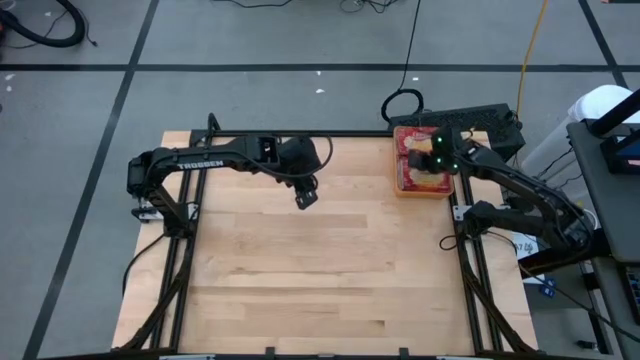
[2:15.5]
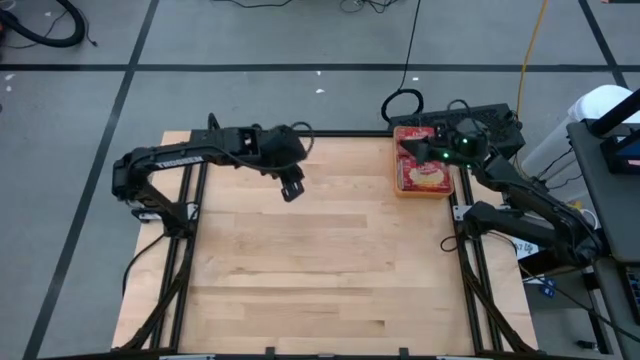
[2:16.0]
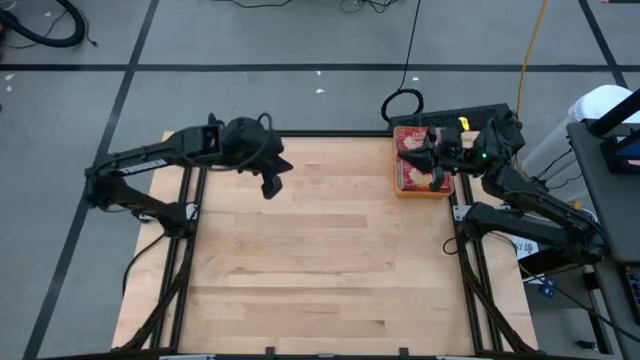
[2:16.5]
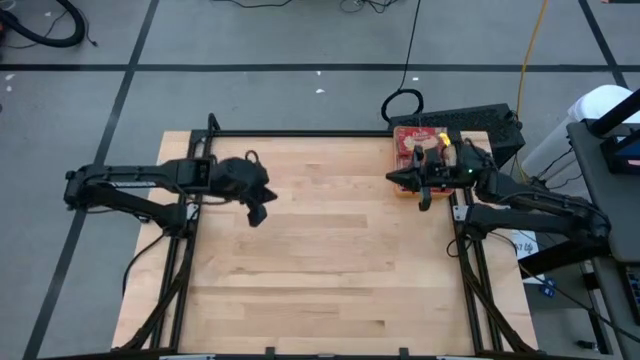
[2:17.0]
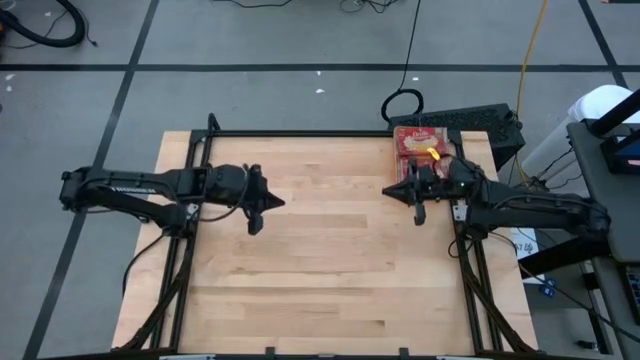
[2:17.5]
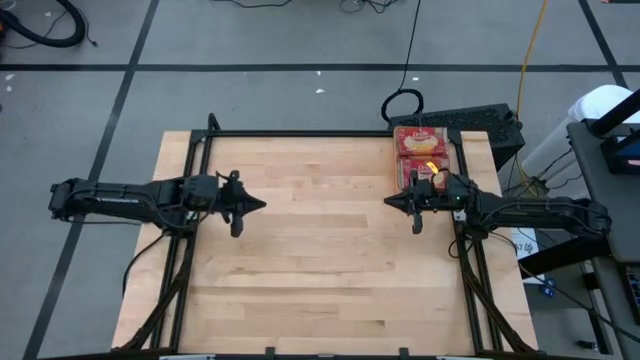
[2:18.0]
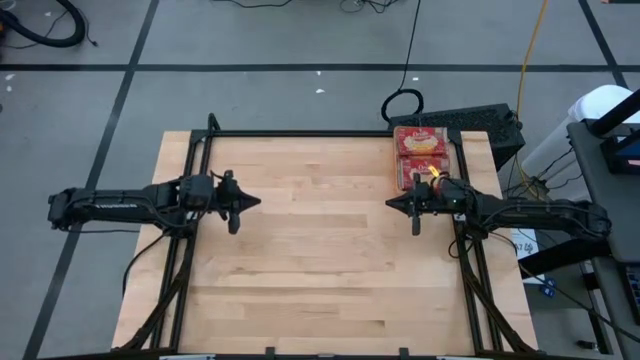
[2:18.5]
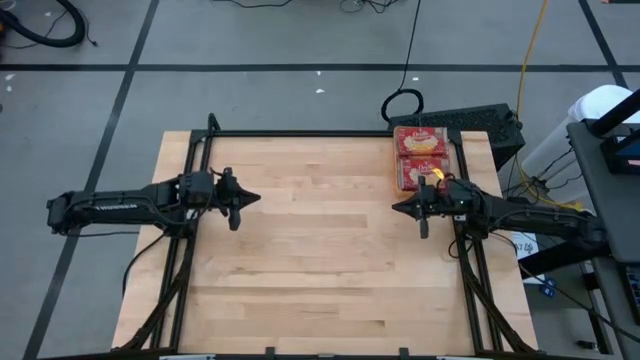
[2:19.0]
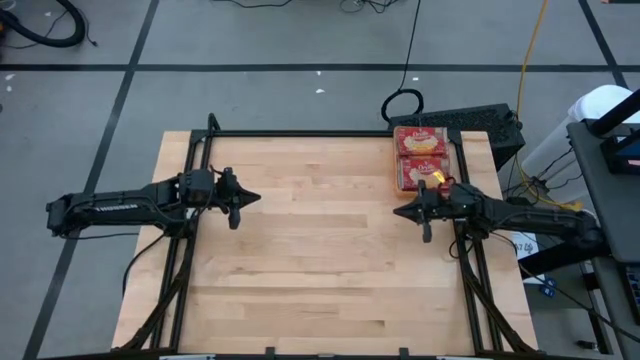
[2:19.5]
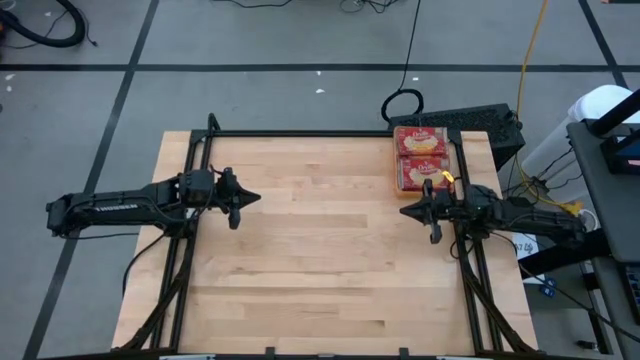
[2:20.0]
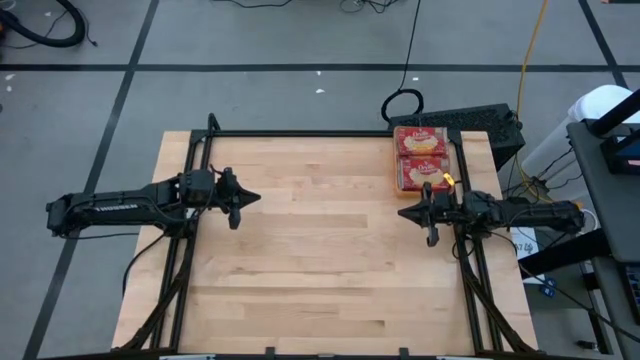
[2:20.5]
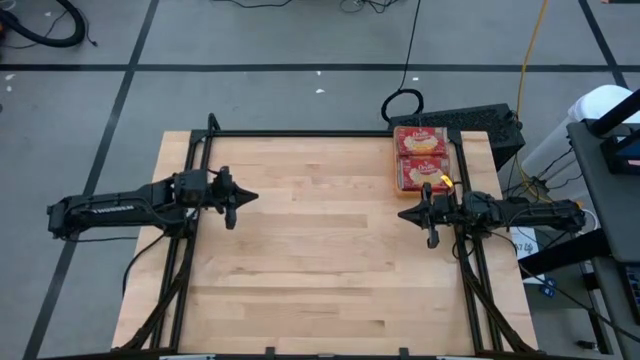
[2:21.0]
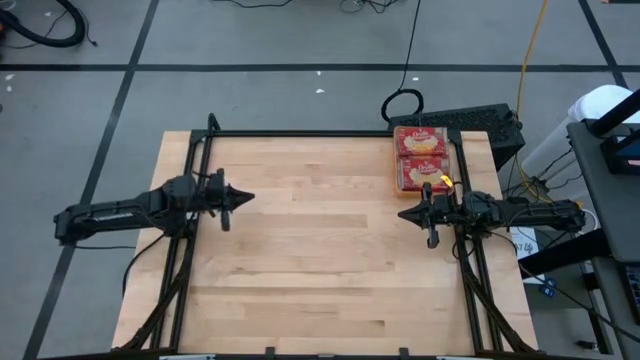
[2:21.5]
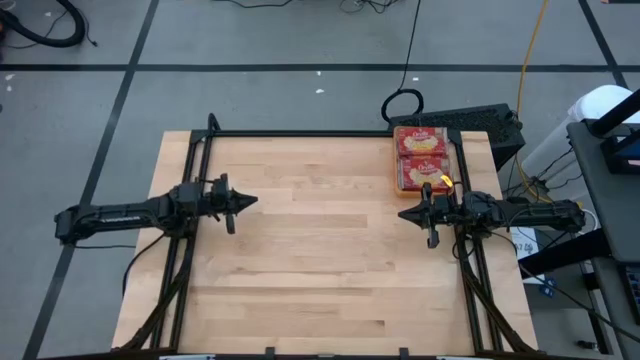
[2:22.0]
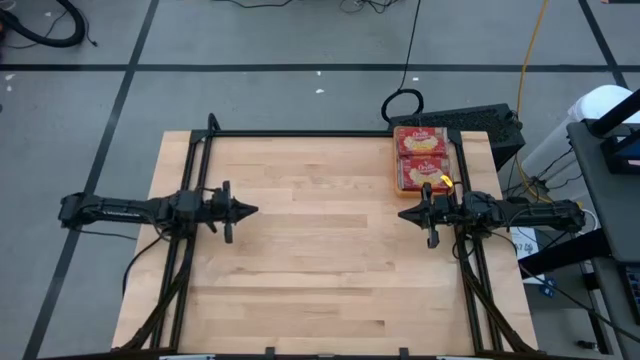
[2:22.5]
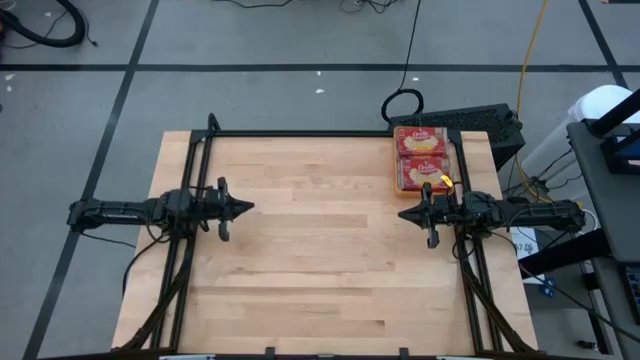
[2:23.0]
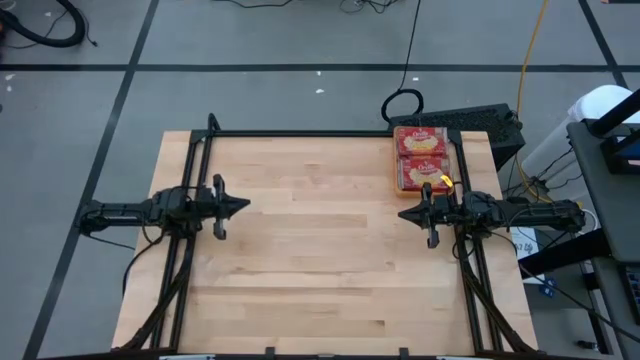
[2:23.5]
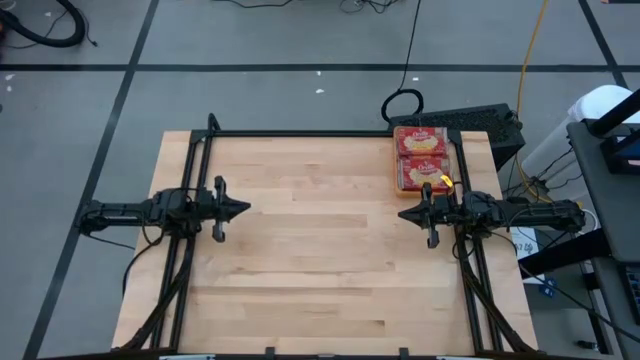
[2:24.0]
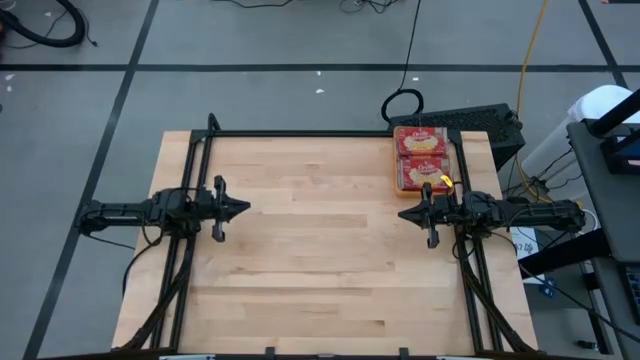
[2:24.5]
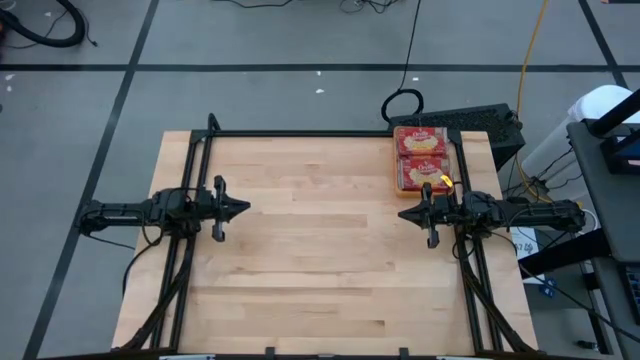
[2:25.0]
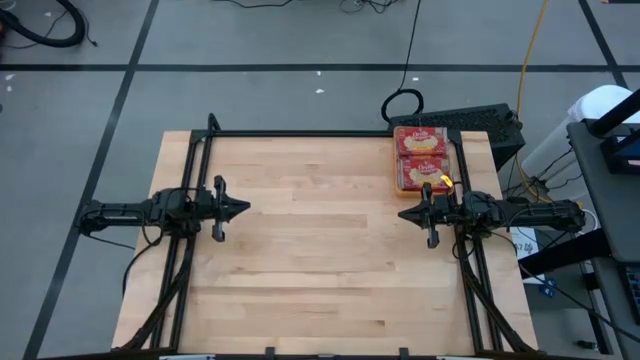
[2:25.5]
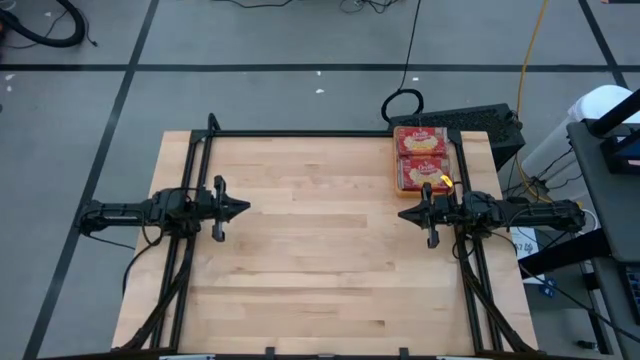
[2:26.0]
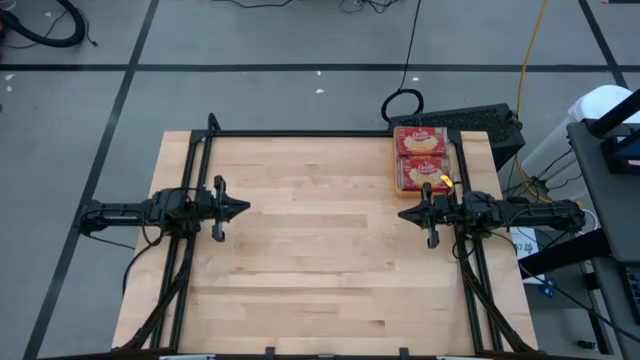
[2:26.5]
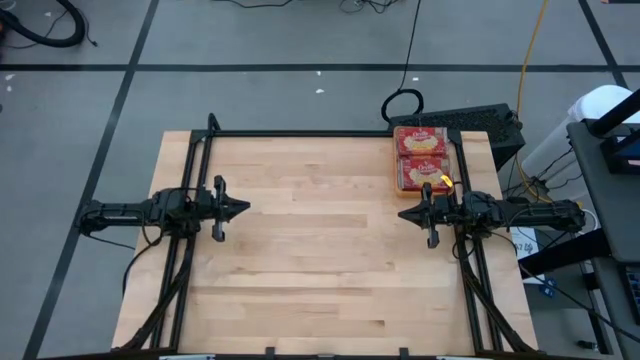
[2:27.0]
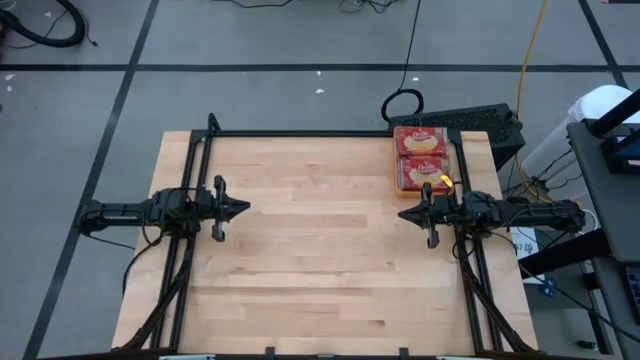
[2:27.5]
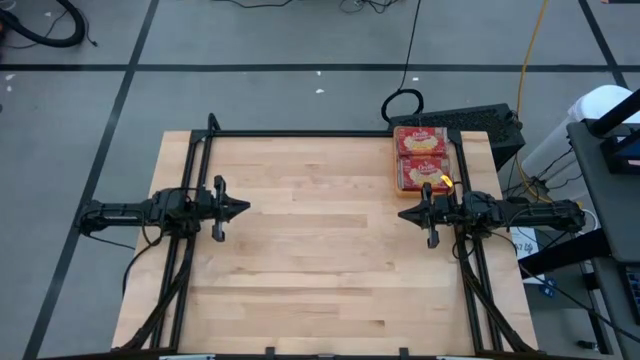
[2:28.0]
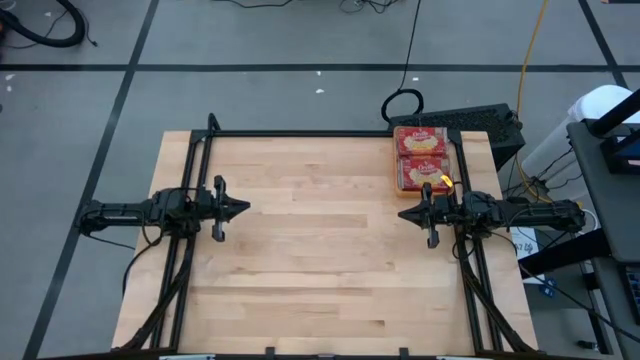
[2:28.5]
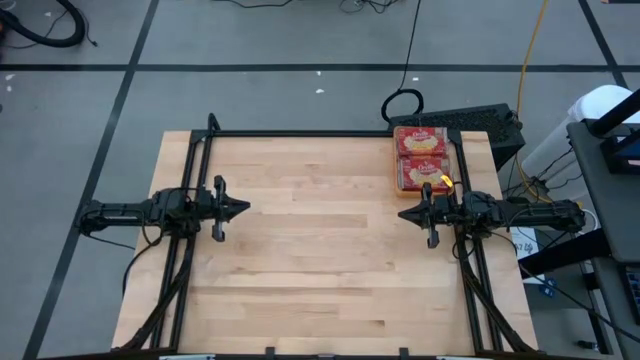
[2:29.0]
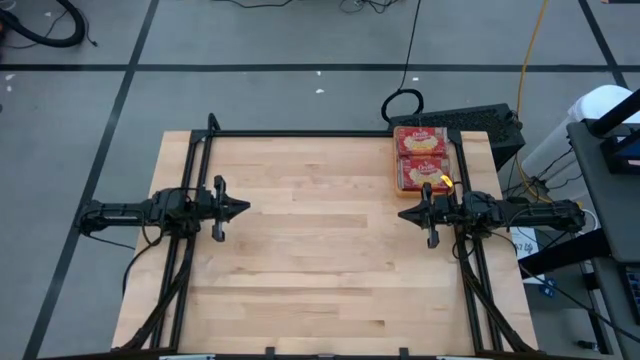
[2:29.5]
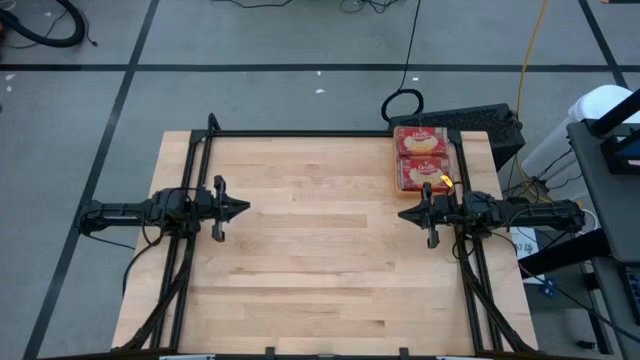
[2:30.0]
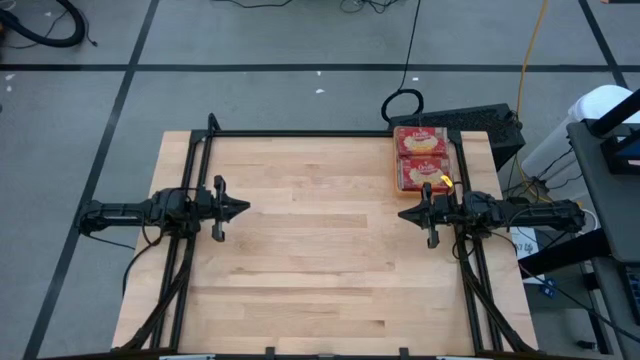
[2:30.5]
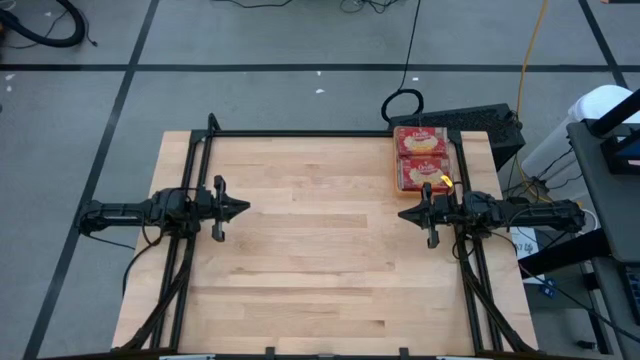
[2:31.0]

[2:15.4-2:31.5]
Task: Sort popcorn bags into baskets
Return to Home Position

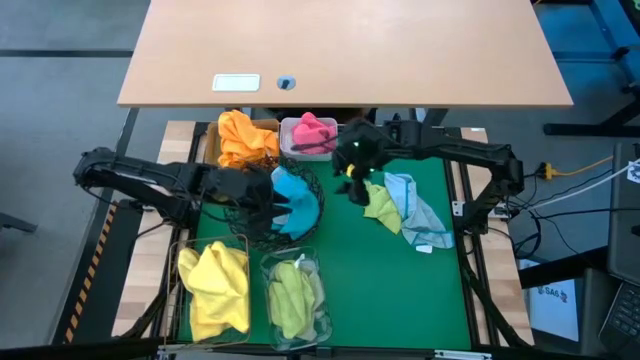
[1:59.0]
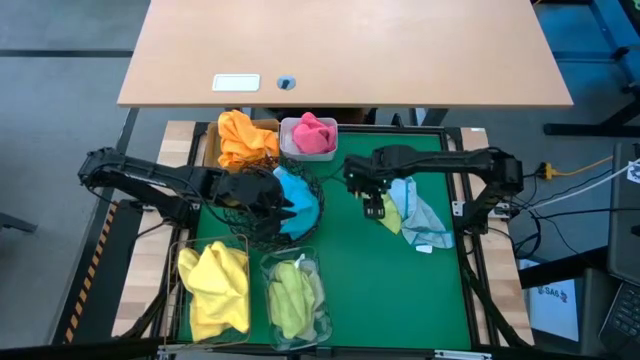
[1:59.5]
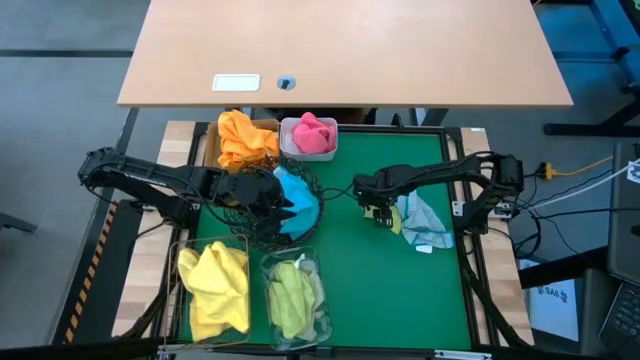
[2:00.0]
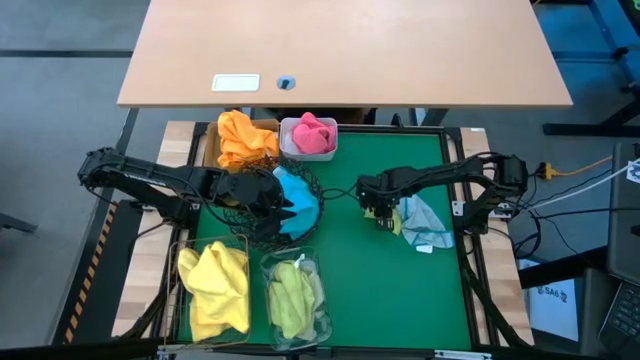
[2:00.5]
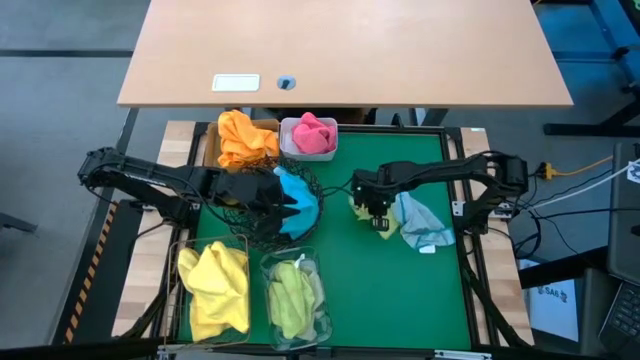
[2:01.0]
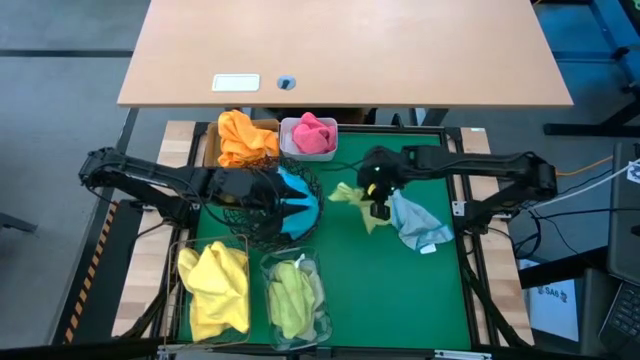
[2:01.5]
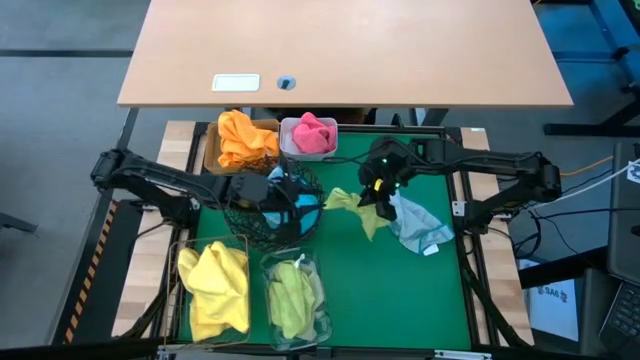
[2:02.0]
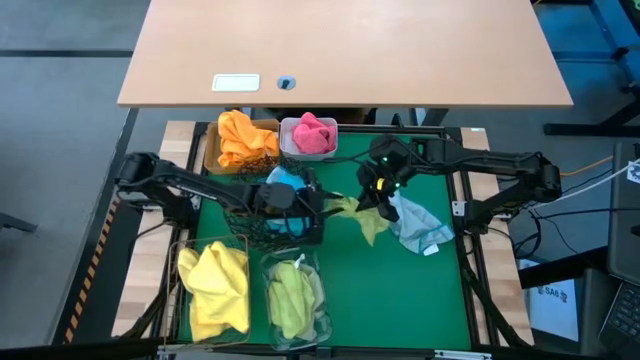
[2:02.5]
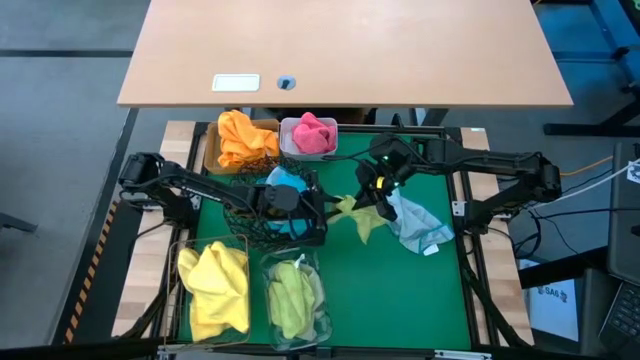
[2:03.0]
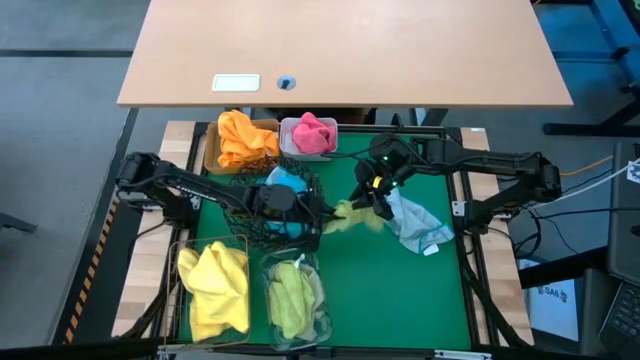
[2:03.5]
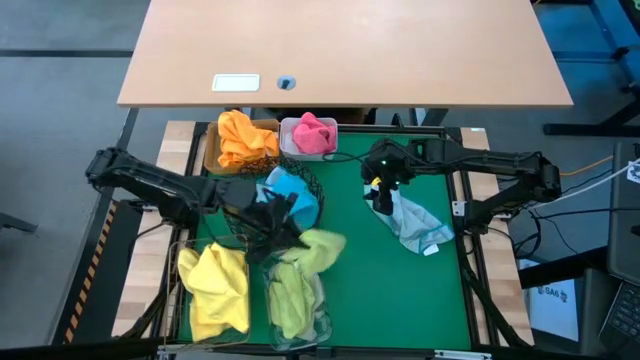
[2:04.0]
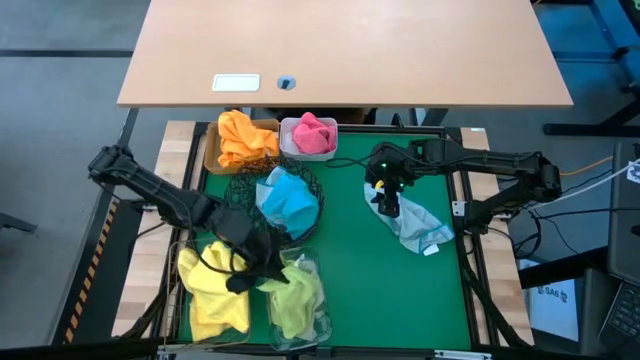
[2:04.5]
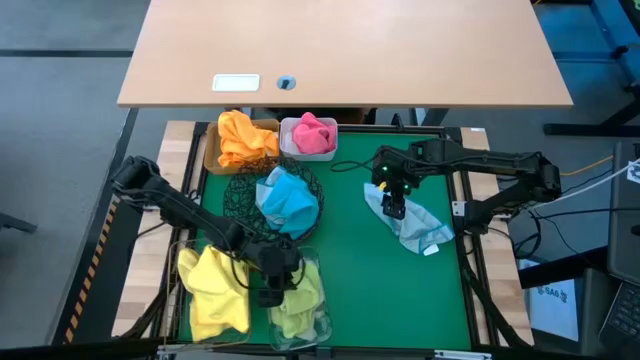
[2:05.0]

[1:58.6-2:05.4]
Task: Sort microfiber towel by color & place in baskets
Put the light green microfiber towel into the transparent bin
